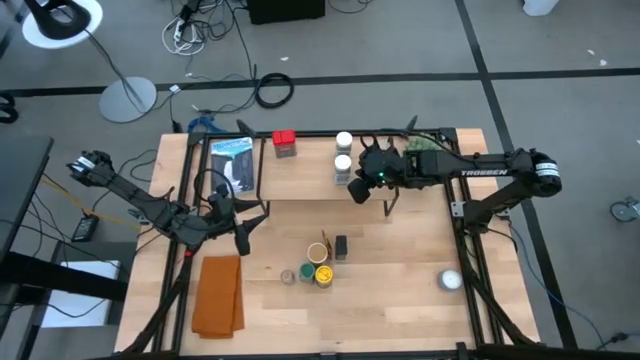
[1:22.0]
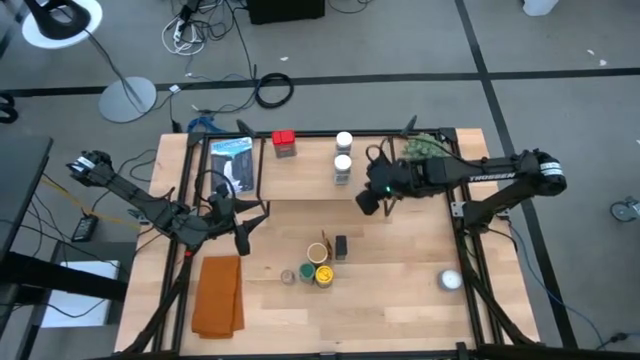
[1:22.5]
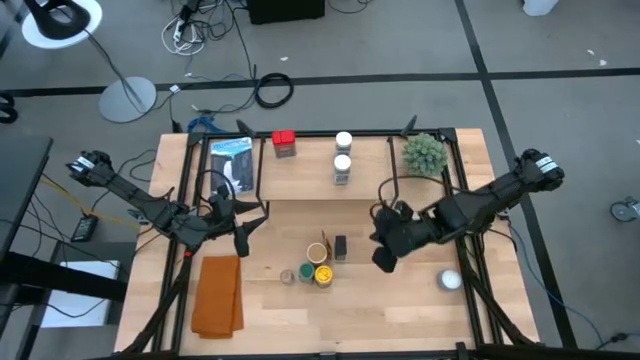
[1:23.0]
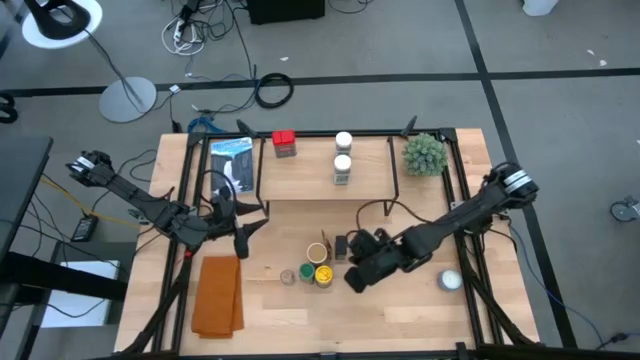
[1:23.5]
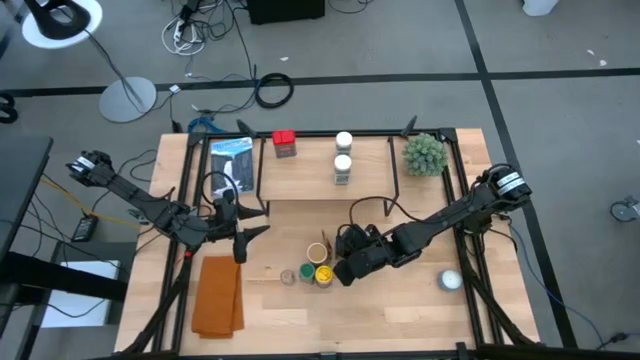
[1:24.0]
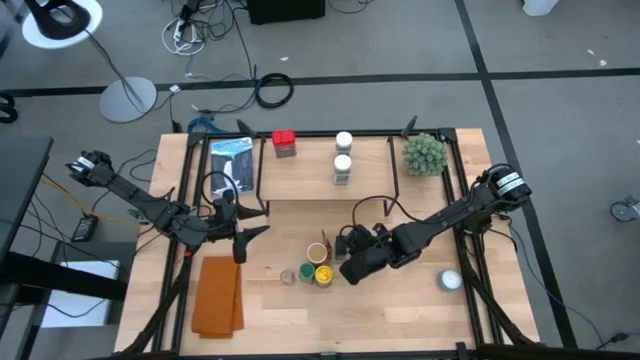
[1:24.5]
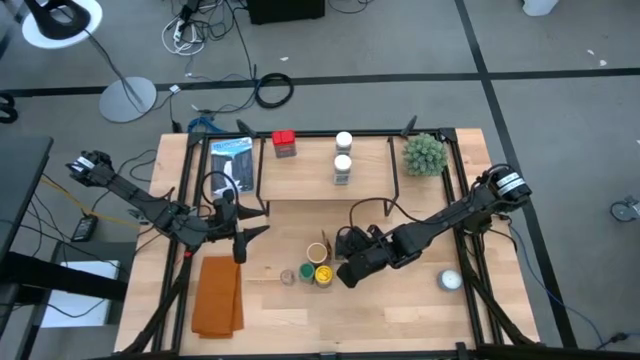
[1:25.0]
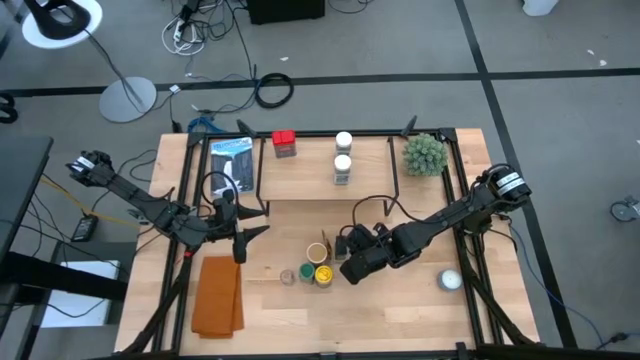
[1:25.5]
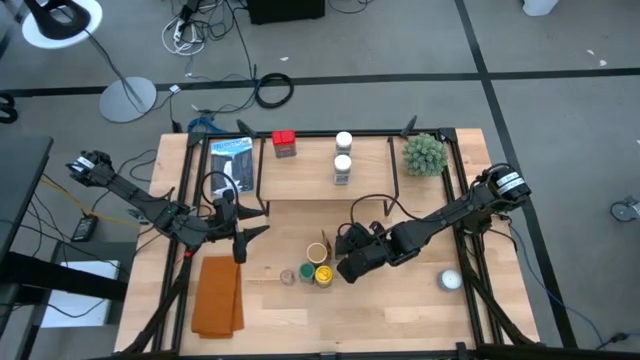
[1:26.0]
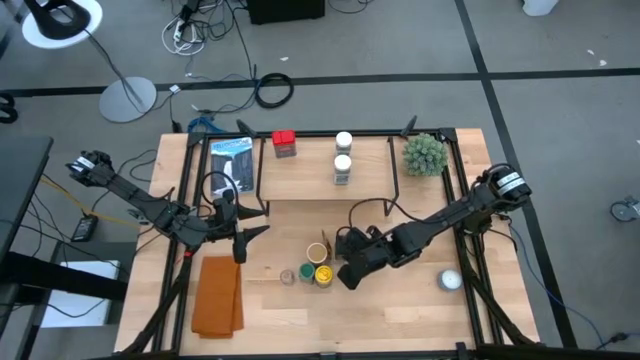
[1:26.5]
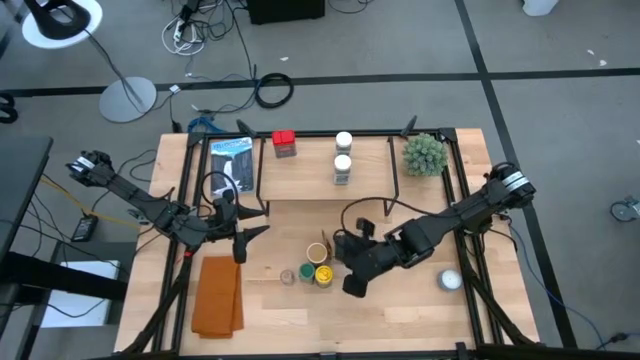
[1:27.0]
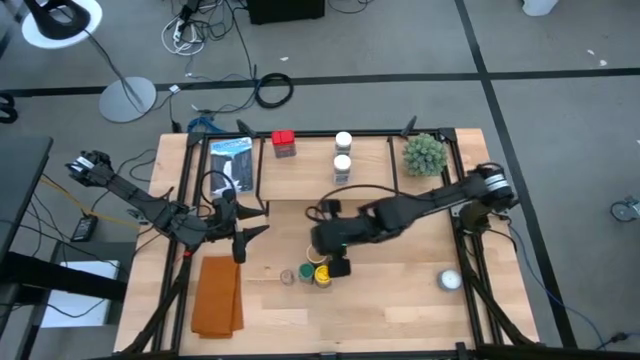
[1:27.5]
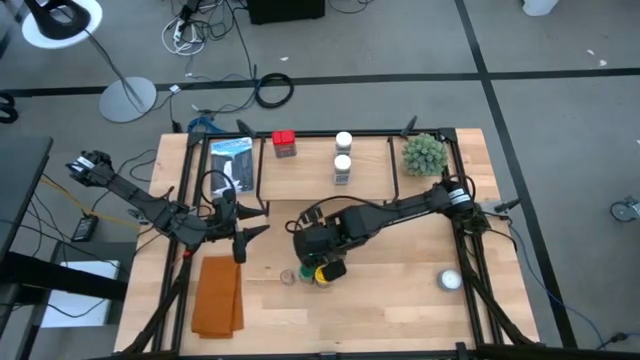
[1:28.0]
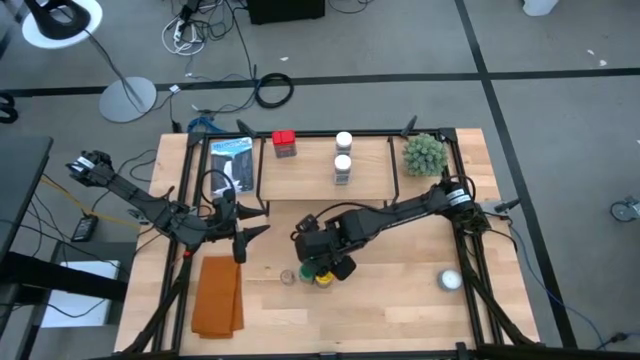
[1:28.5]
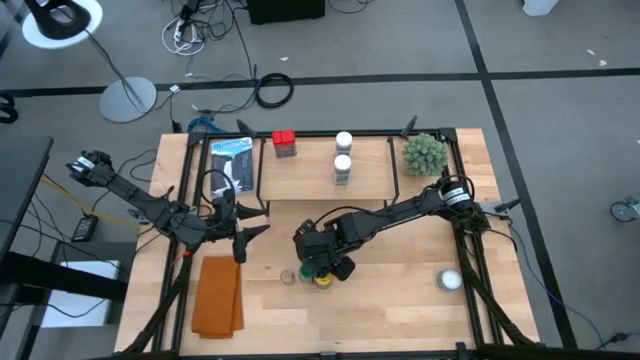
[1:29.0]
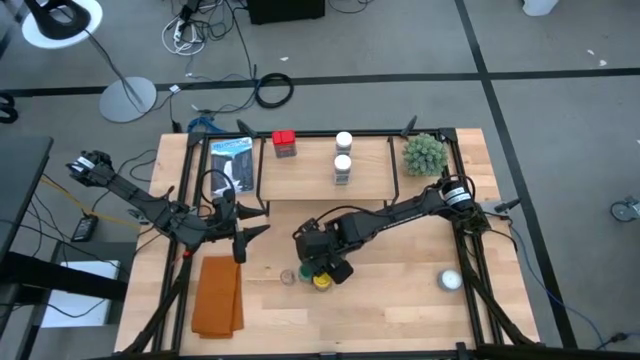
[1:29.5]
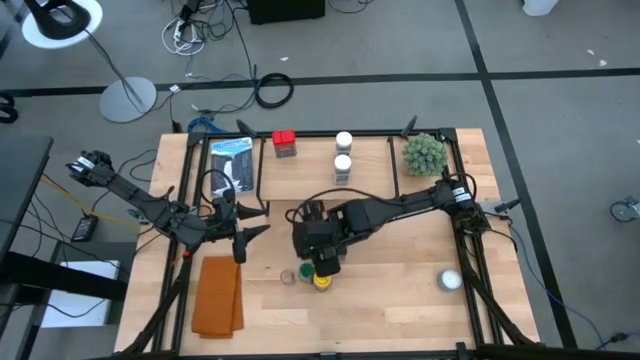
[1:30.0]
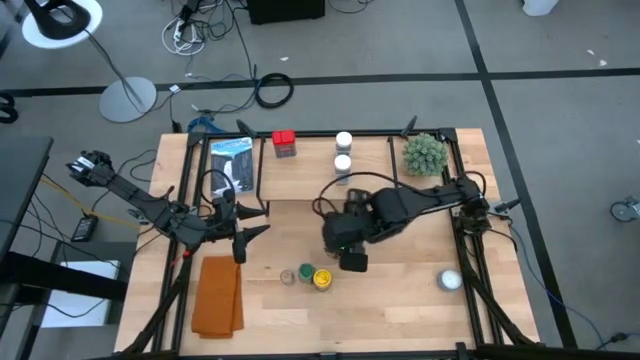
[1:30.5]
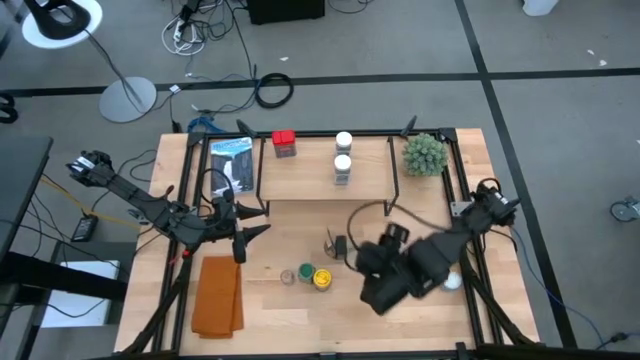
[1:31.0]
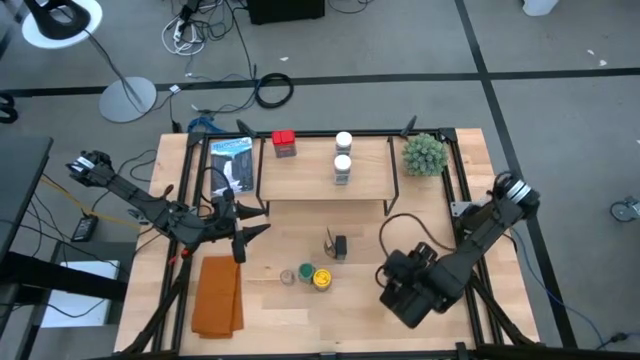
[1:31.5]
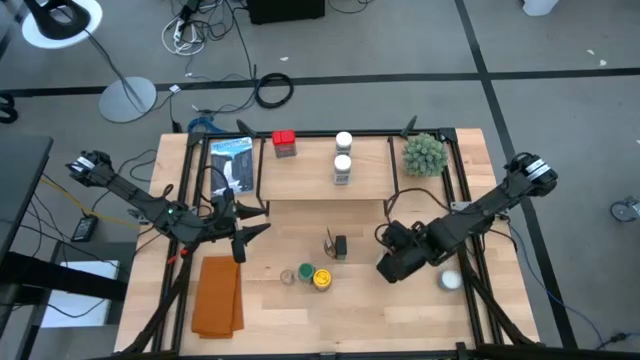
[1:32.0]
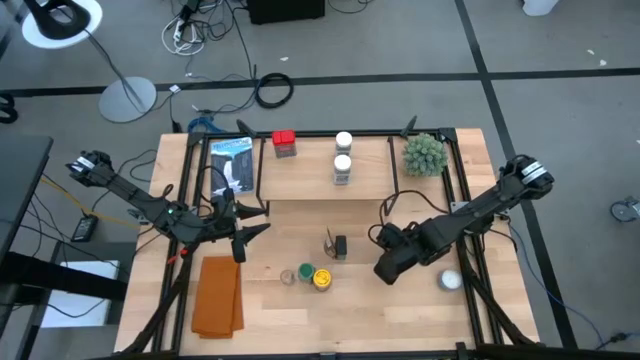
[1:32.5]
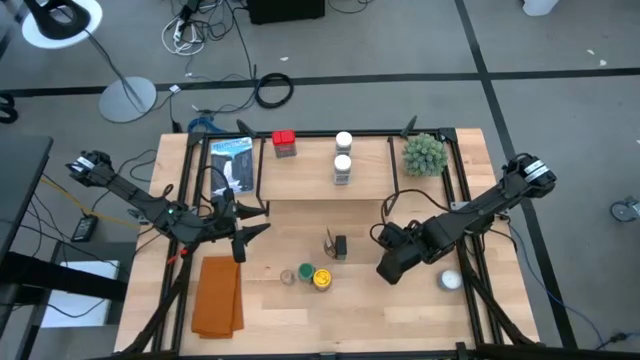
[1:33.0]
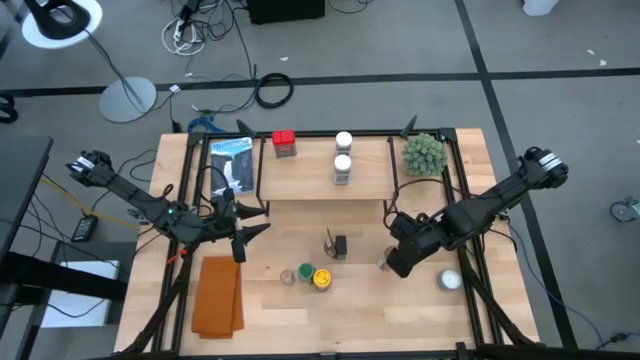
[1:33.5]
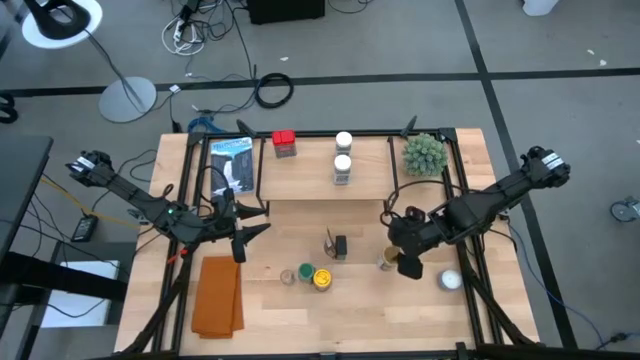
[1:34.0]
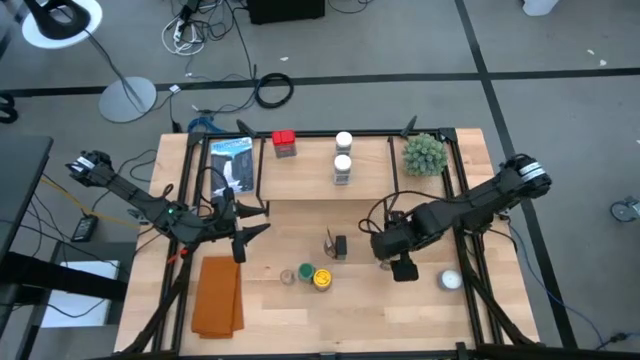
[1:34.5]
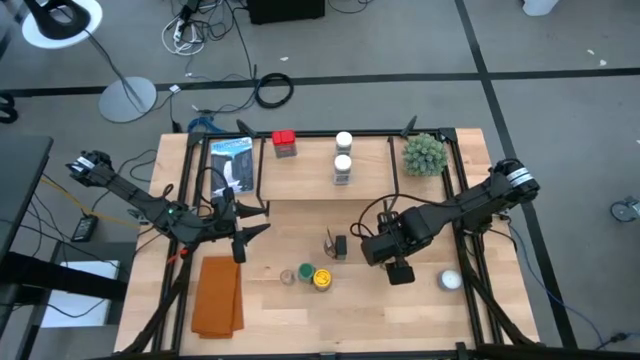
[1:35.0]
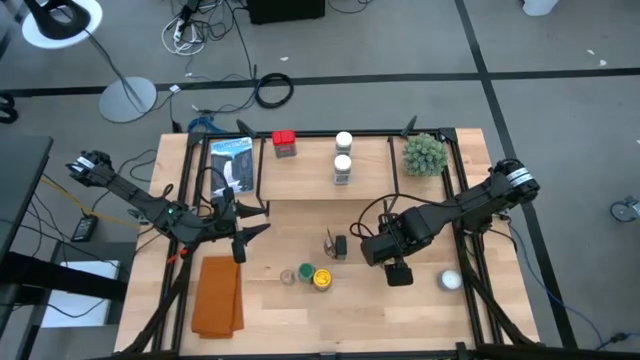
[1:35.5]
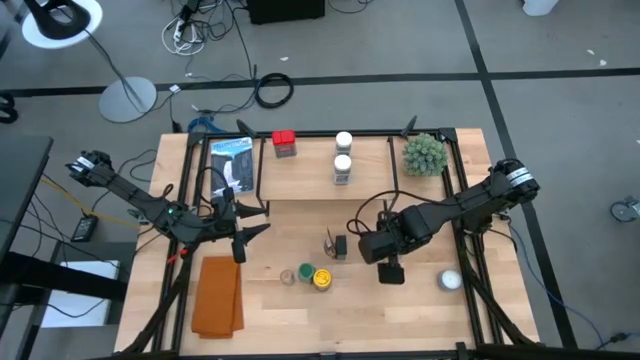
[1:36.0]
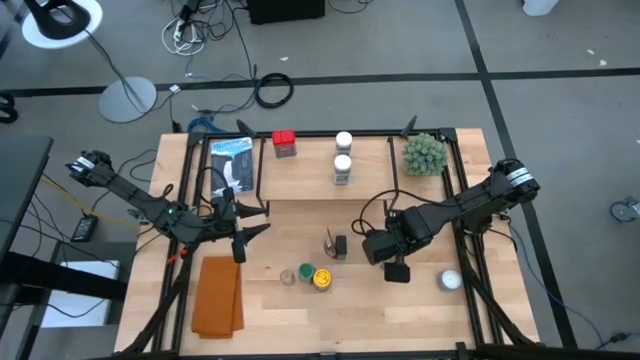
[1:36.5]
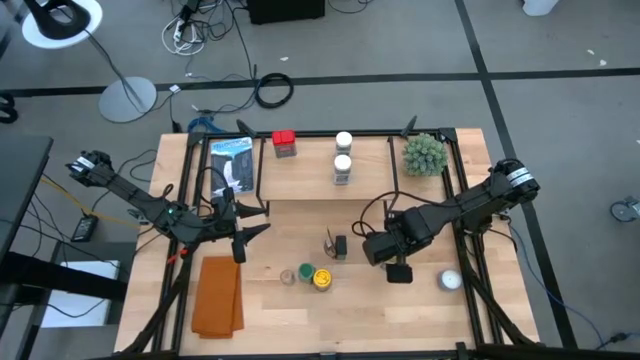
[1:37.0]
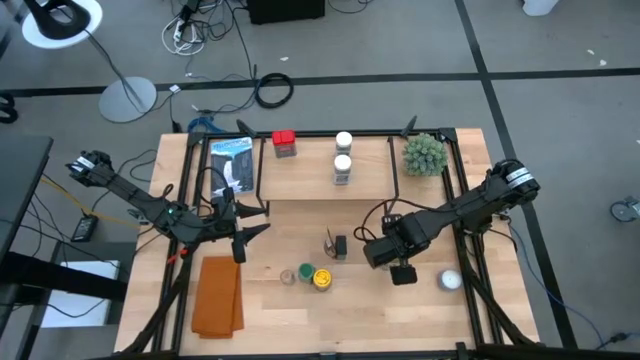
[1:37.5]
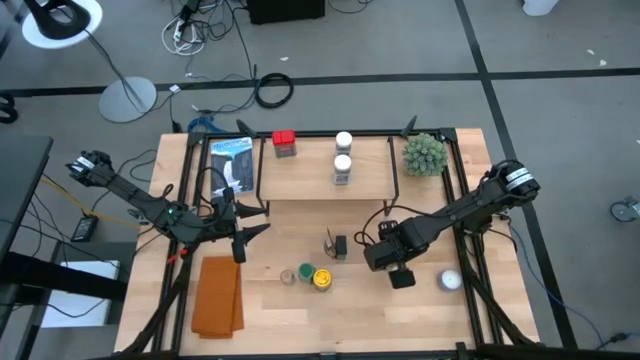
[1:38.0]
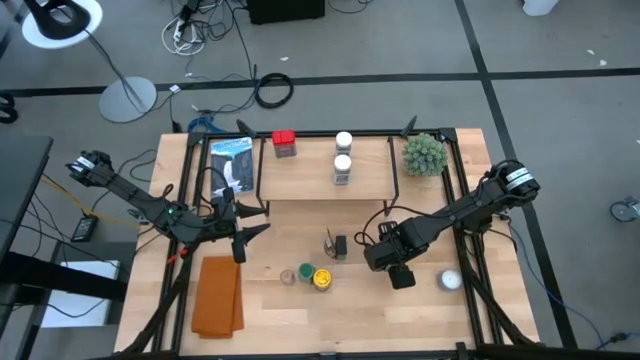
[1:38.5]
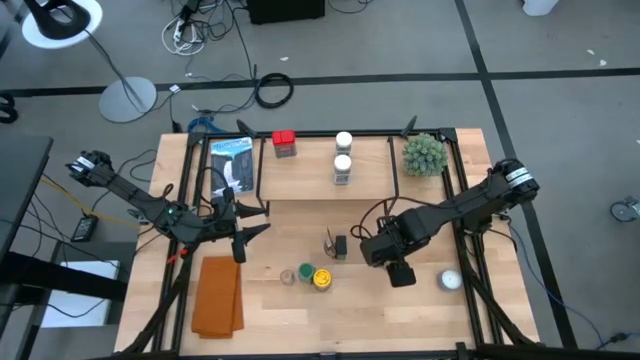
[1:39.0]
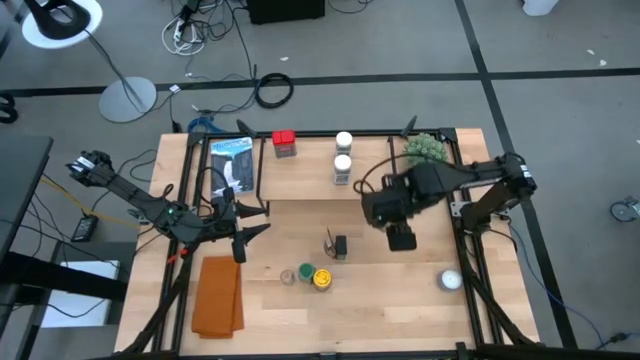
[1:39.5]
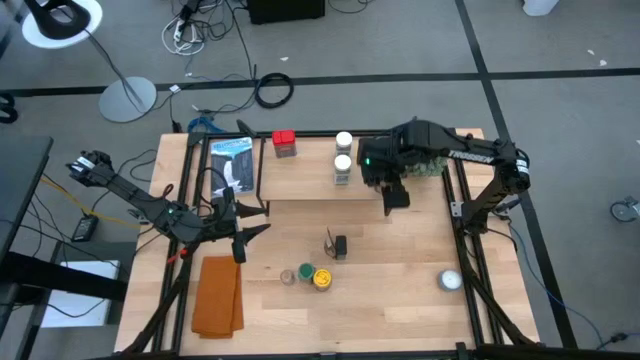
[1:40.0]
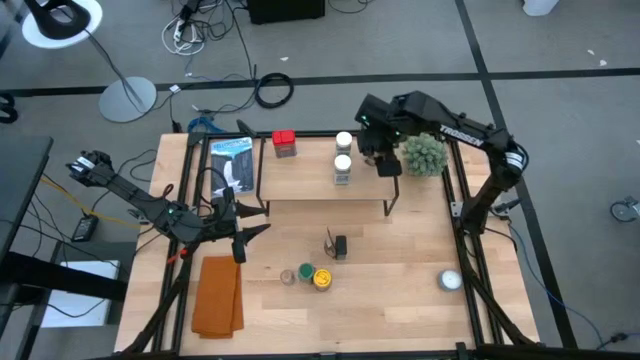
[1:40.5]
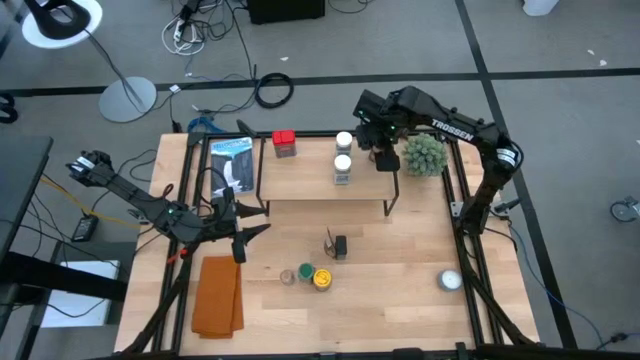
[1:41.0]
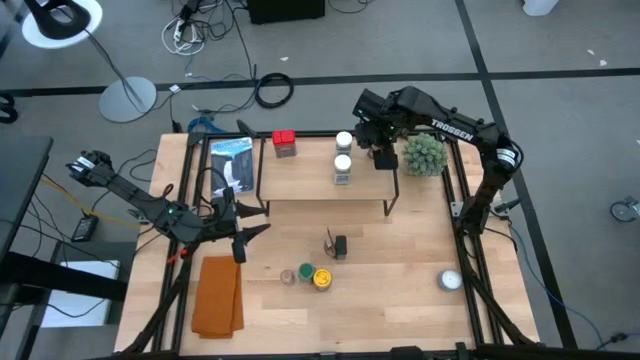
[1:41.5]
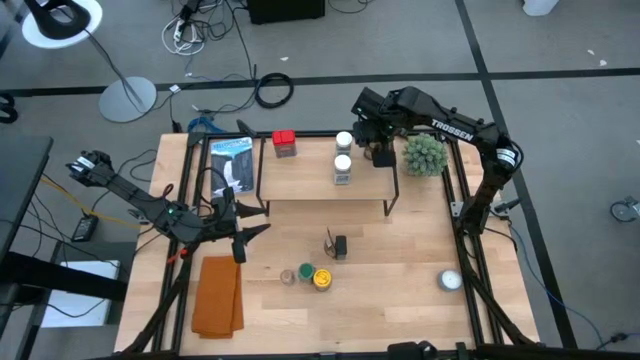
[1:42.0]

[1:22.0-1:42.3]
Task: Shelf spices
Put the gold seasoning bottle on the shelf
